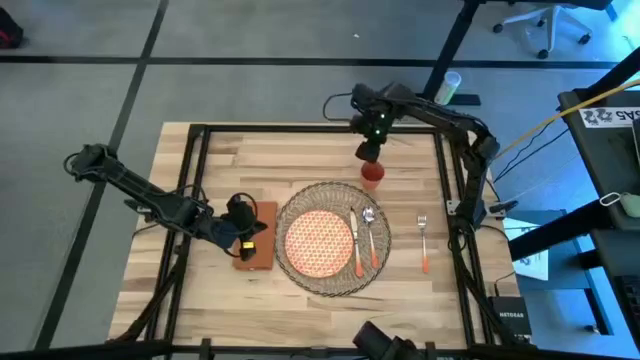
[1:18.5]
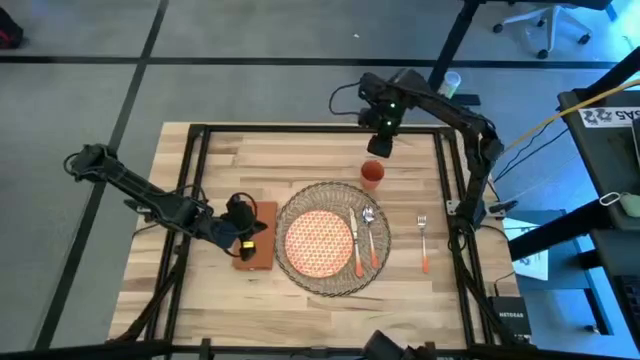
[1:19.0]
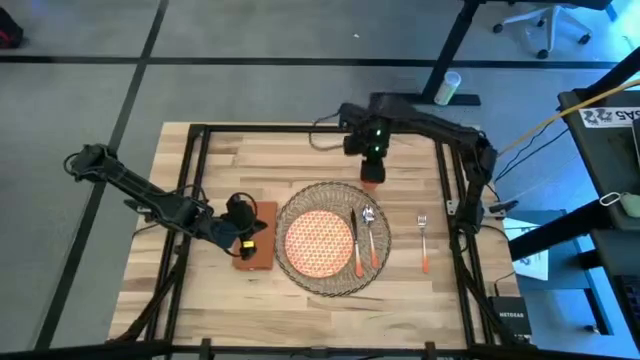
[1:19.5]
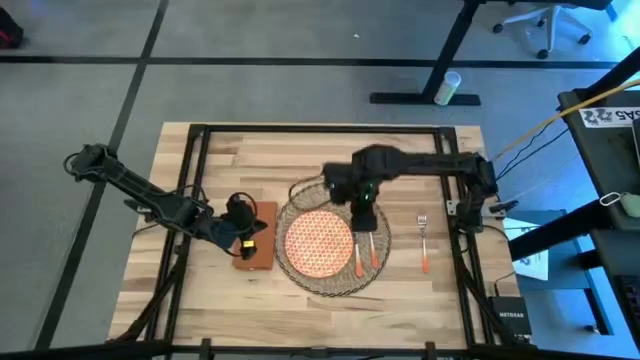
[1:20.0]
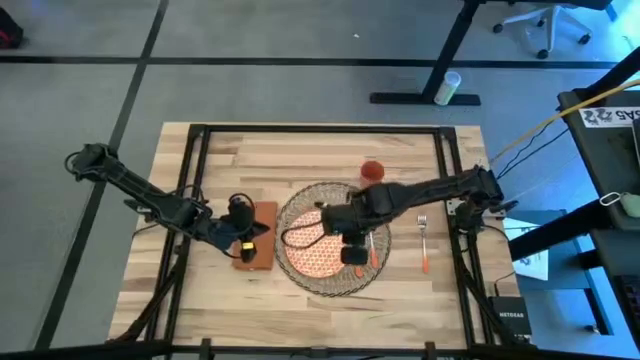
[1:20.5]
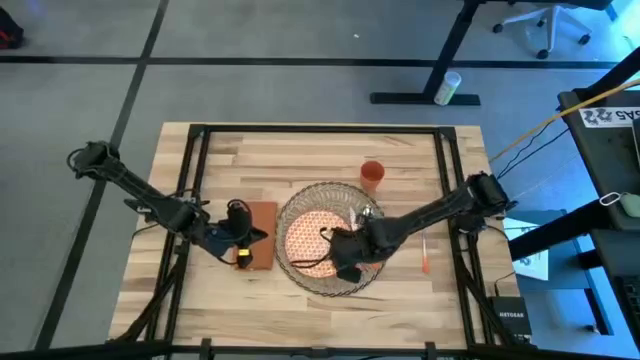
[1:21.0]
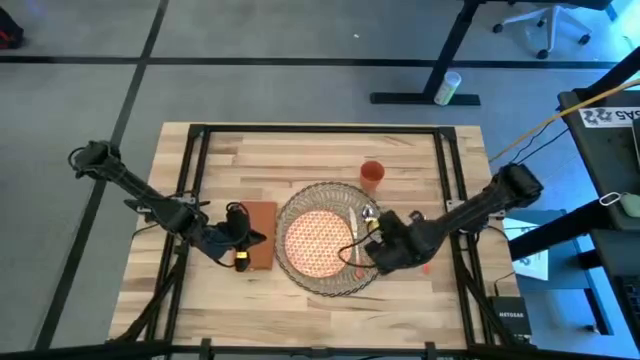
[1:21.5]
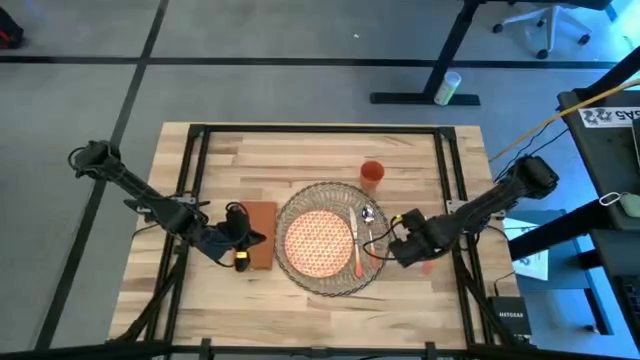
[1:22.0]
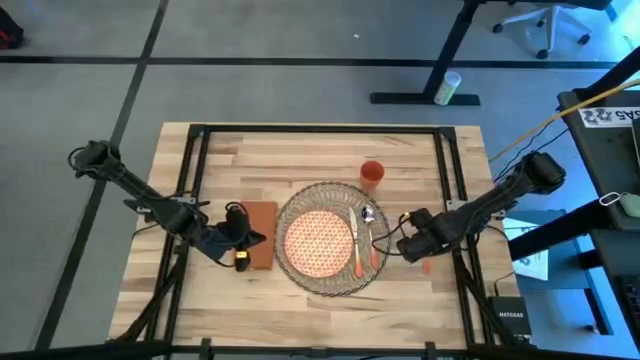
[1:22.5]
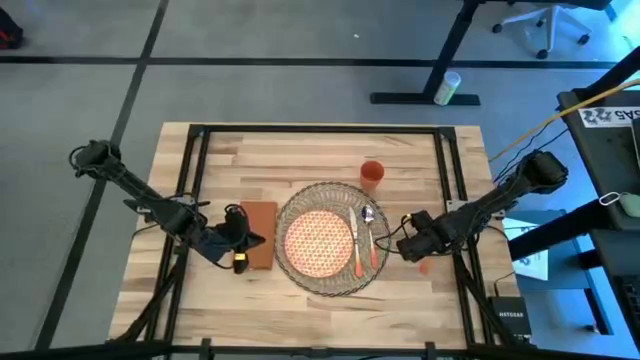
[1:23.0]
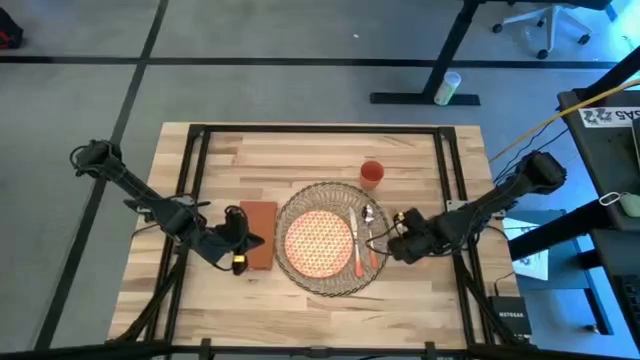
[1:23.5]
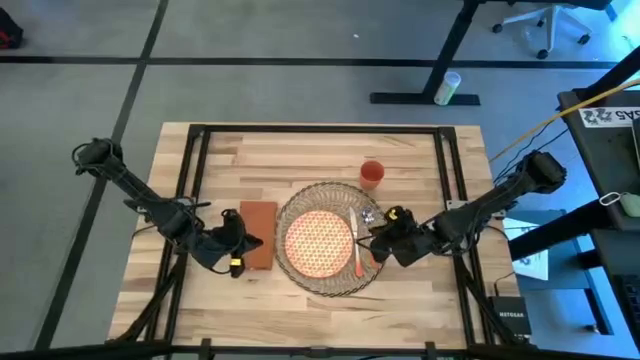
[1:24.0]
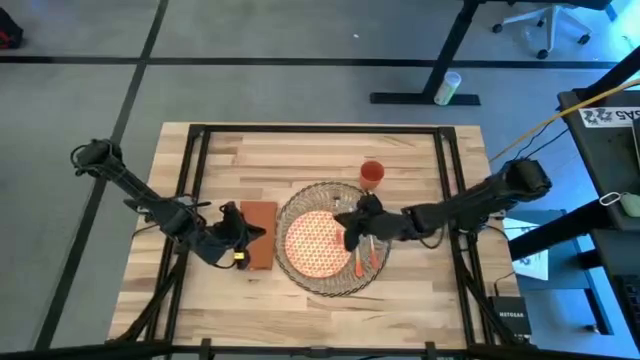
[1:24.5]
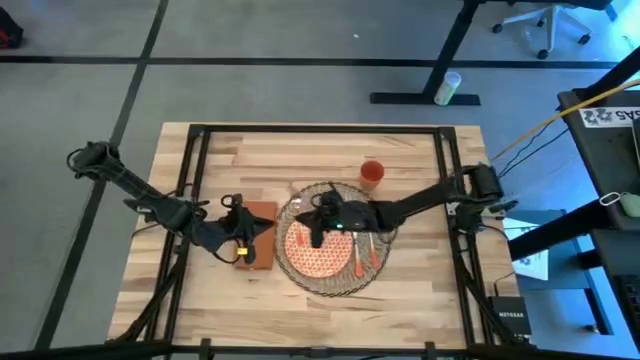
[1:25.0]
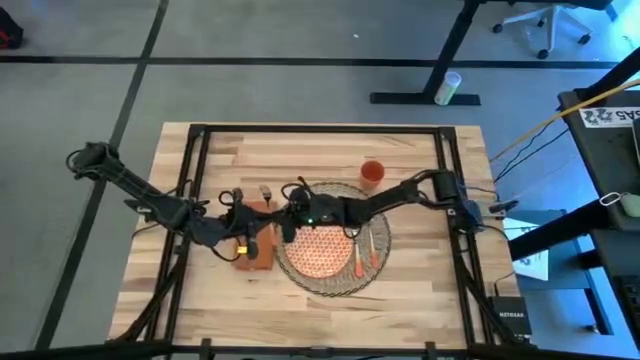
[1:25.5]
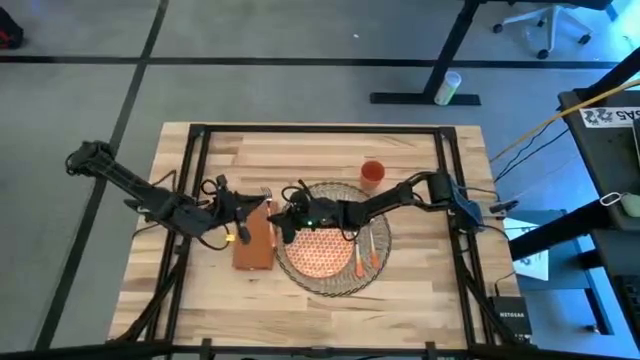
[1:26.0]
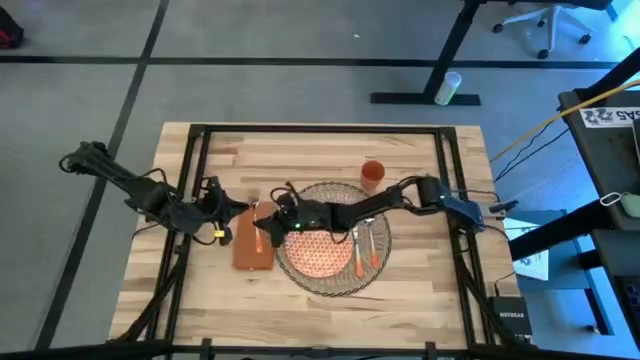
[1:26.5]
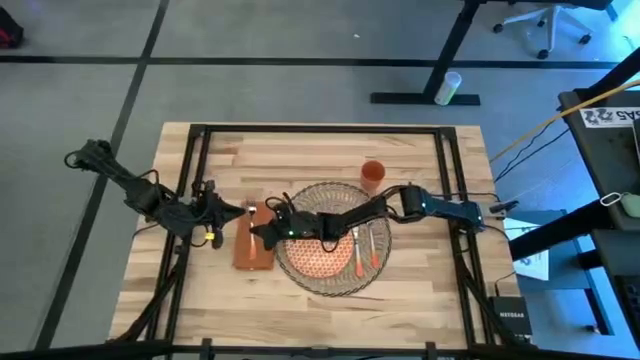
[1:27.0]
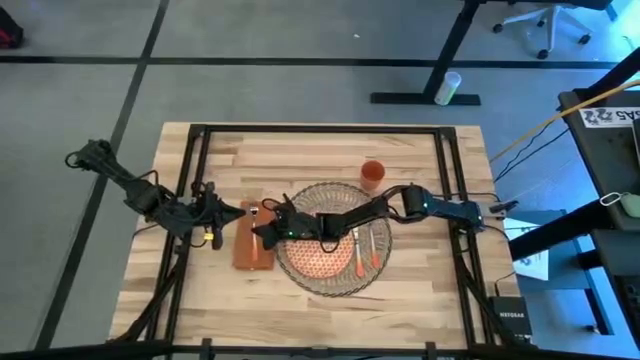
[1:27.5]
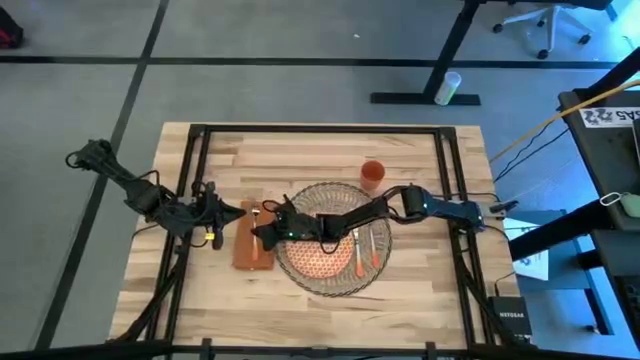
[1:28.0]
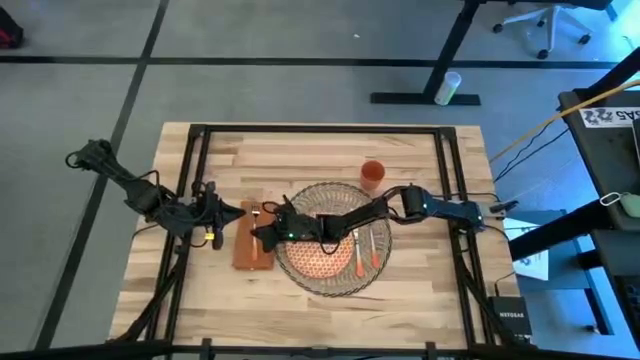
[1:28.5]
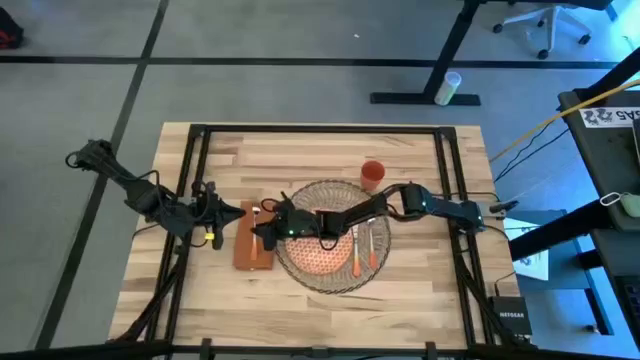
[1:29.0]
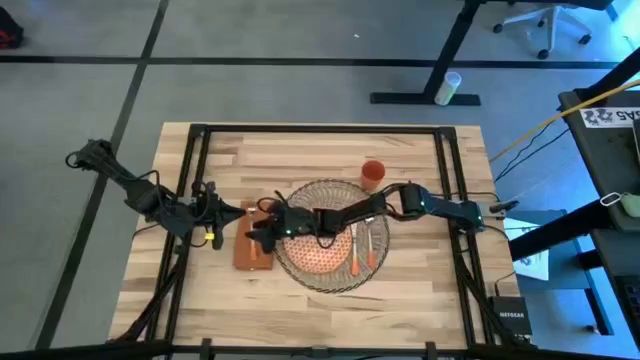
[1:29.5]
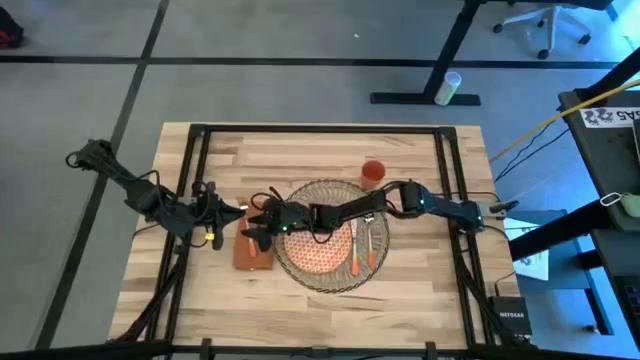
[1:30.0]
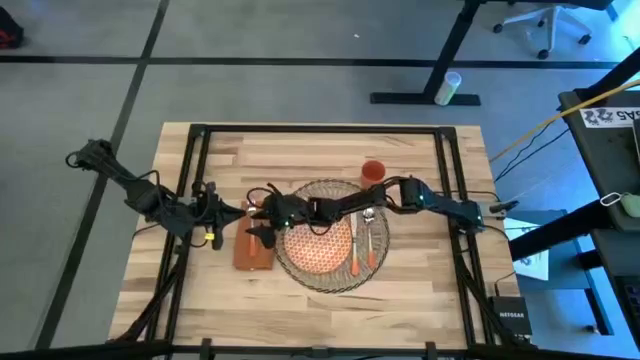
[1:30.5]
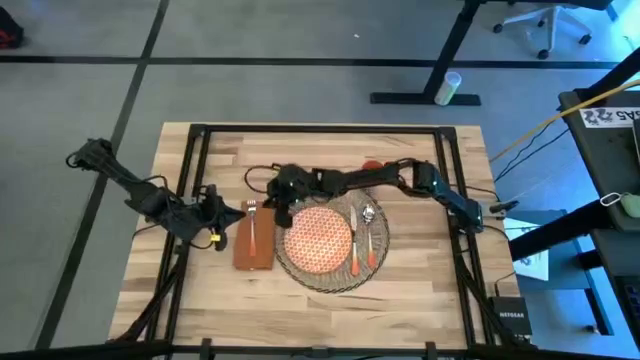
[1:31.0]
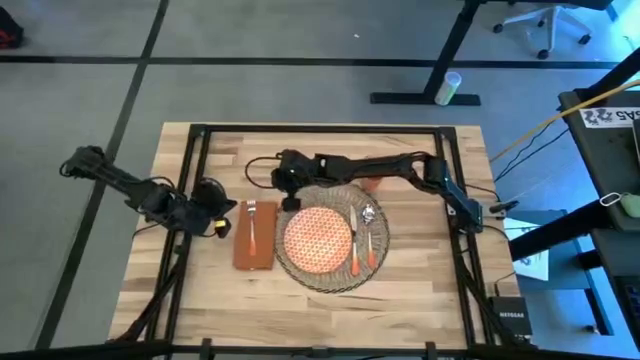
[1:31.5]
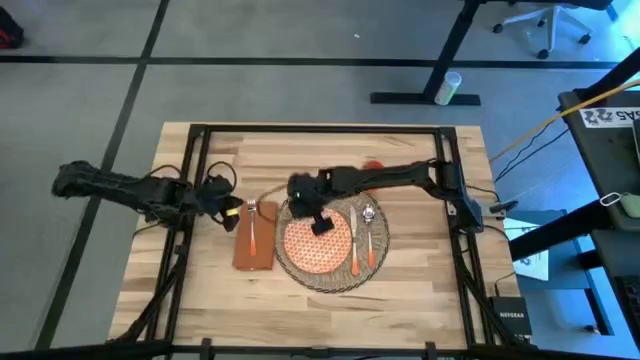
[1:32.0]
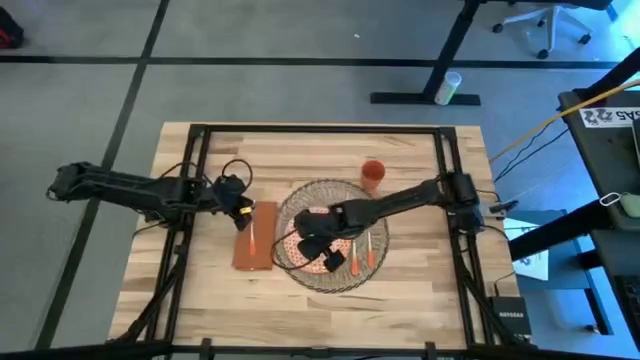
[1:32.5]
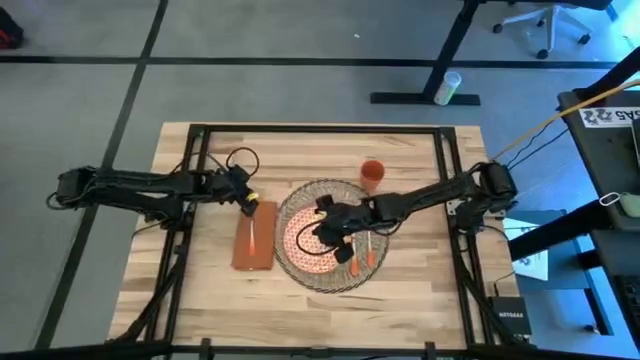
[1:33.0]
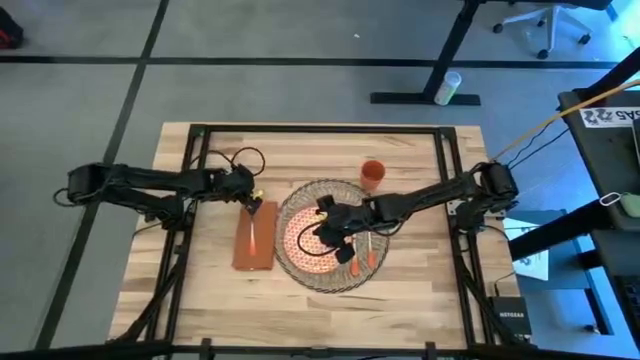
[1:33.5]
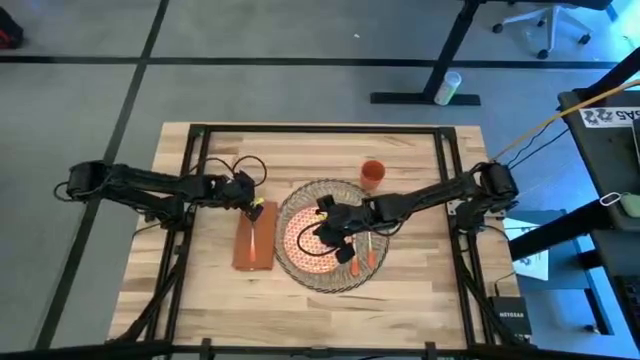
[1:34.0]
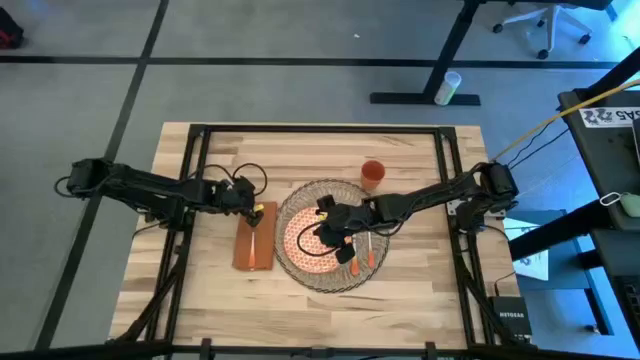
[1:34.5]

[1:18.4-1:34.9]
Task: Set table place
Put the fork on the orange table napkin

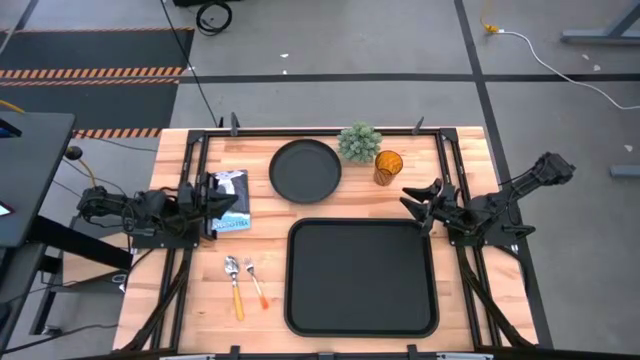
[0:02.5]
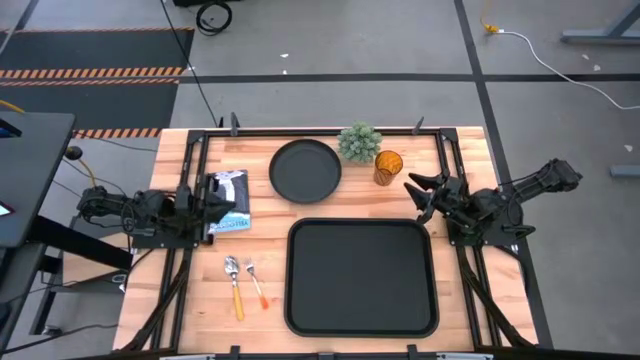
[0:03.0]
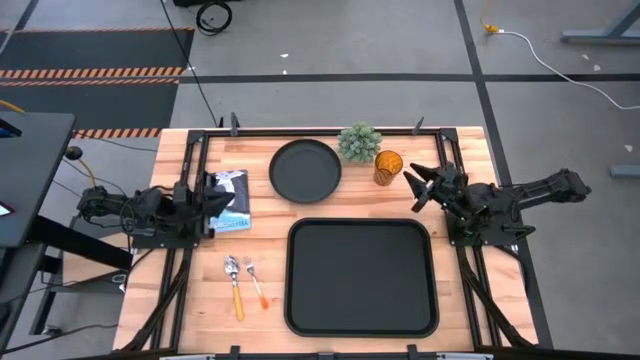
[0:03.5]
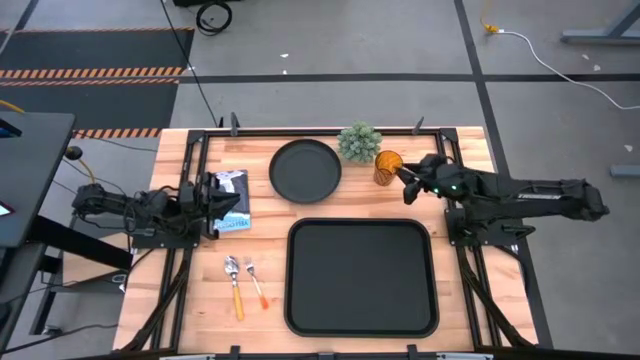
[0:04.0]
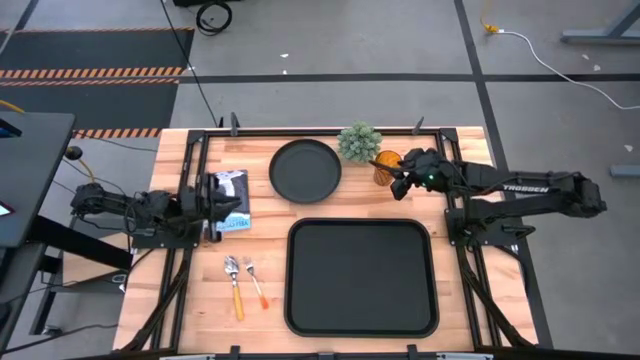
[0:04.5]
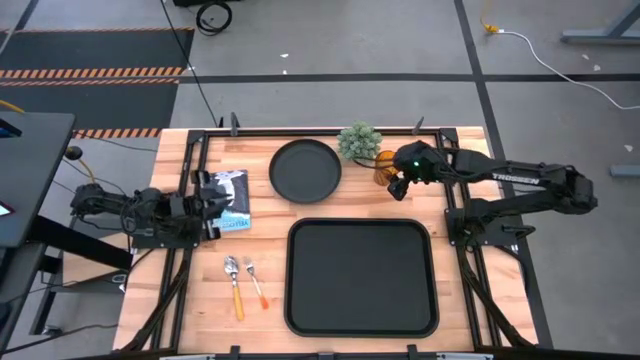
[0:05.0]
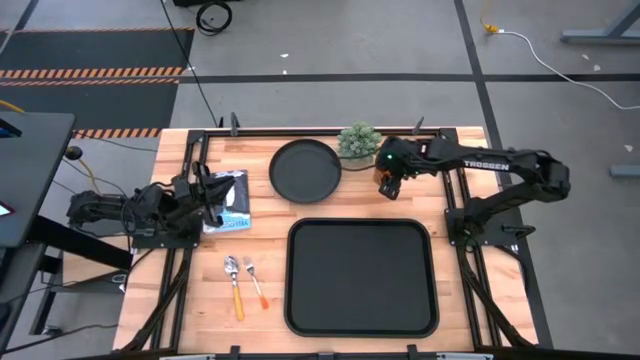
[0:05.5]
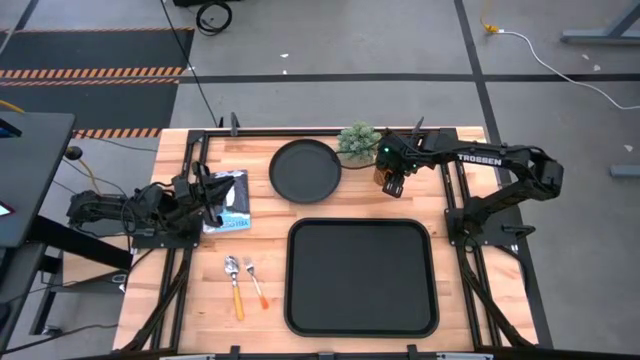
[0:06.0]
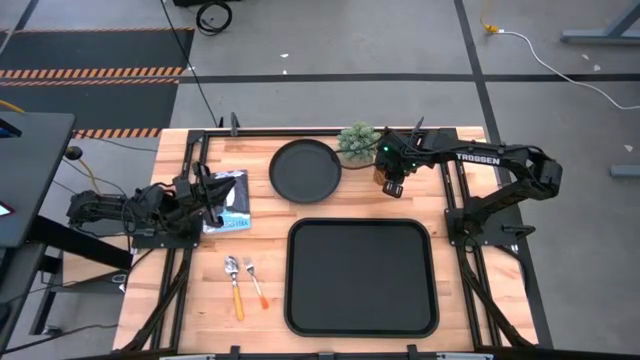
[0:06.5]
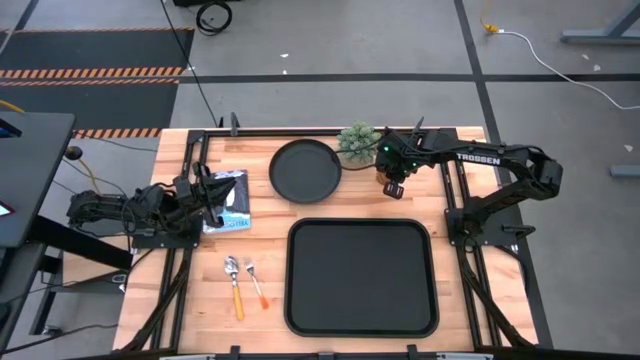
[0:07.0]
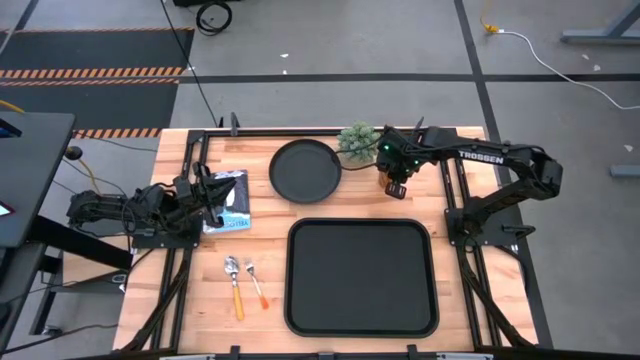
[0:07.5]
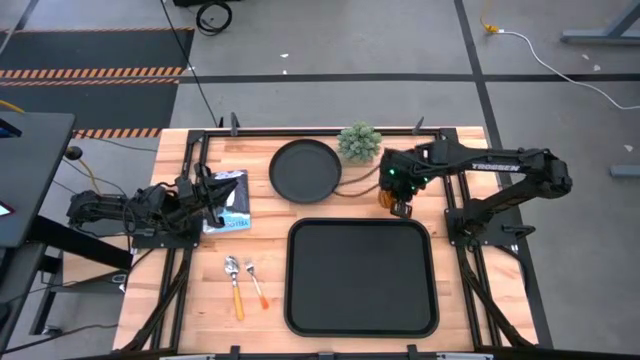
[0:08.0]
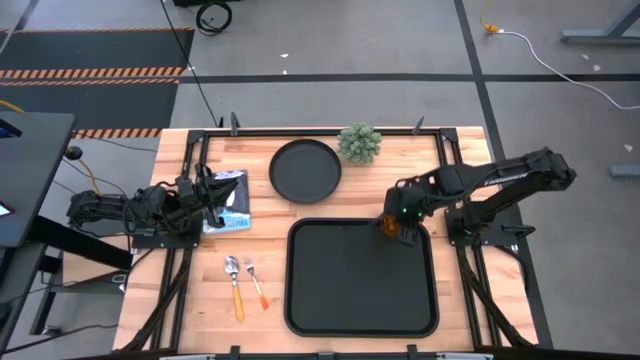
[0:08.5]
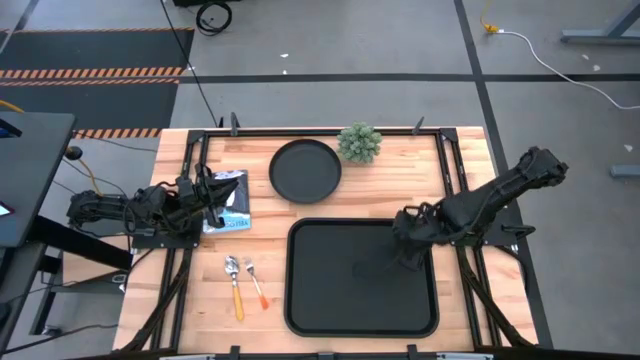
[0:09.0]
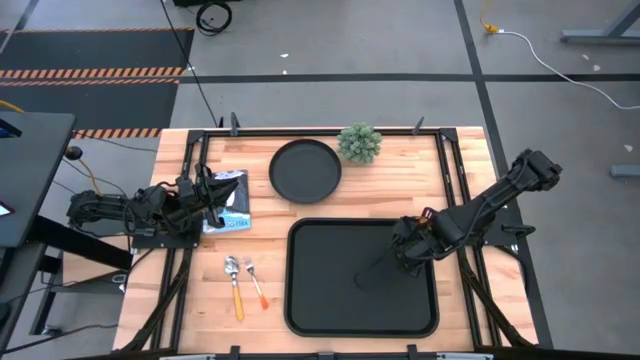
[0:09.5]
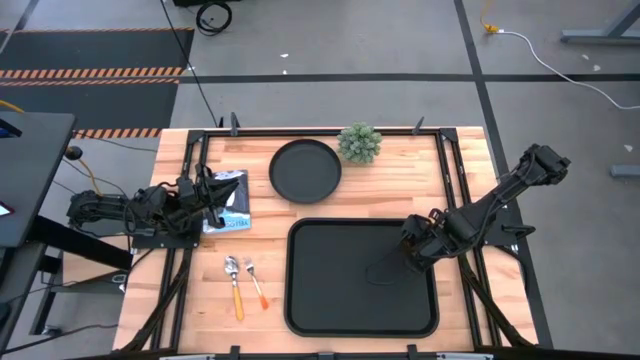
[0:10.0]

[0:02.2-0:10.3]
Task: Pick and place plate/cup/fork/spoon on tray
Put the orange cup on the top right corner of the black tray
